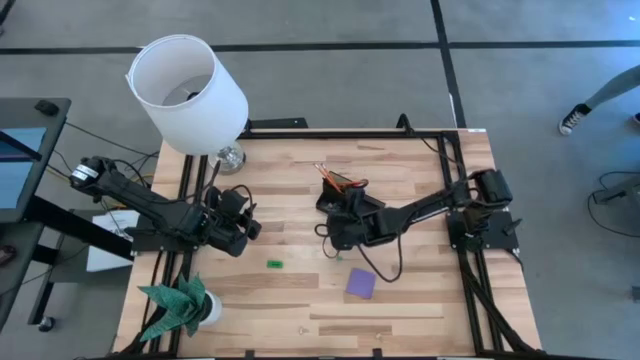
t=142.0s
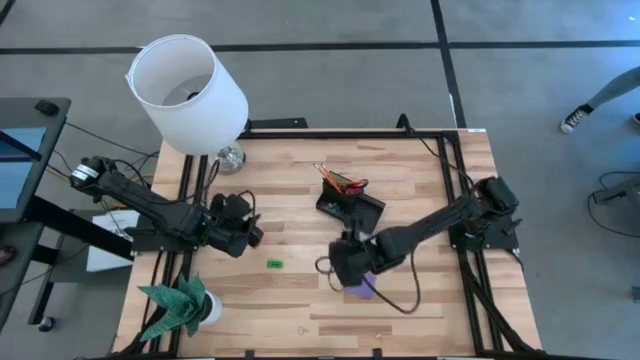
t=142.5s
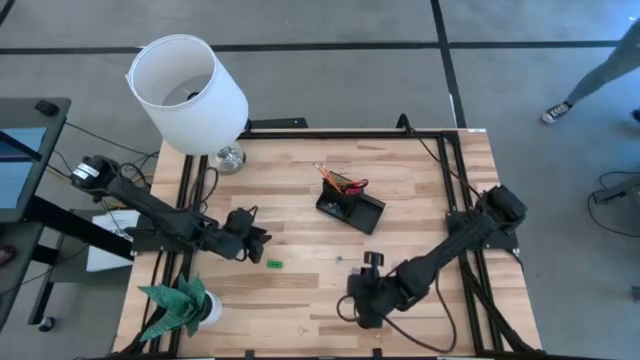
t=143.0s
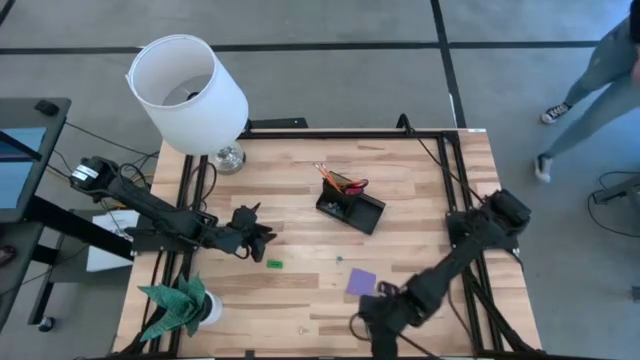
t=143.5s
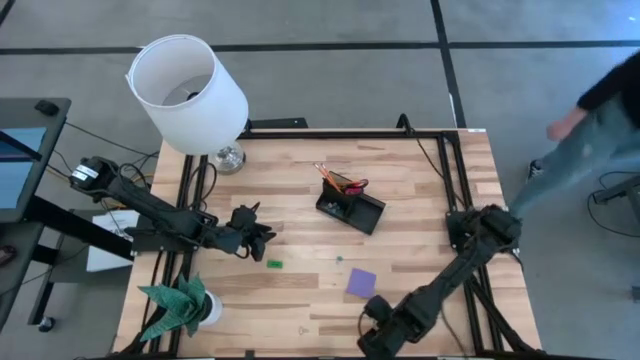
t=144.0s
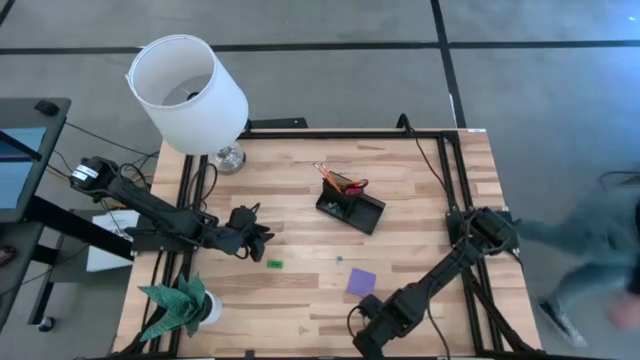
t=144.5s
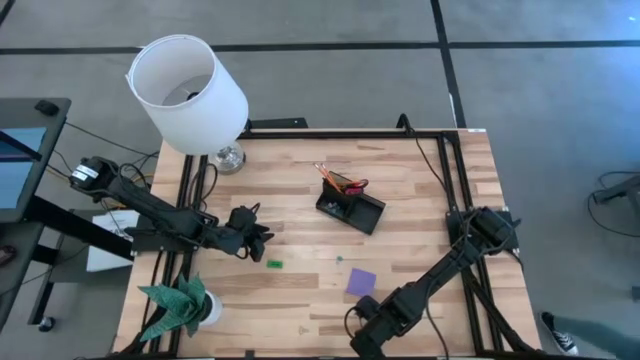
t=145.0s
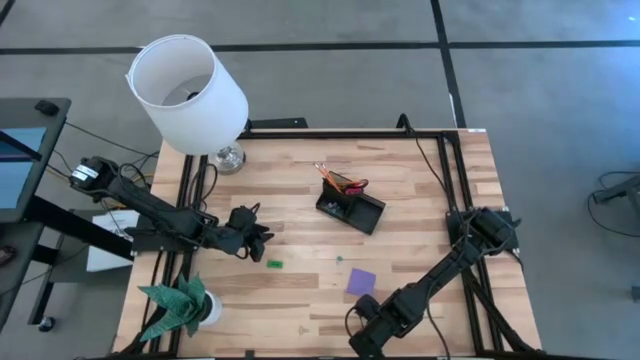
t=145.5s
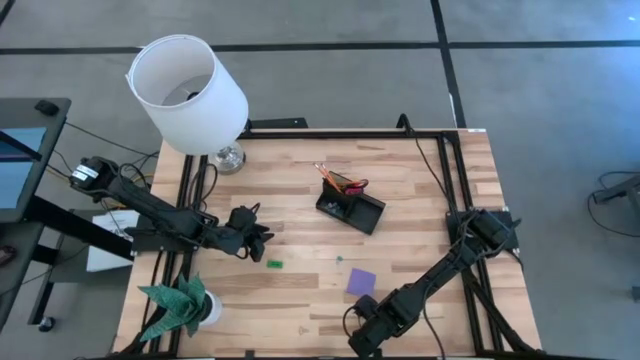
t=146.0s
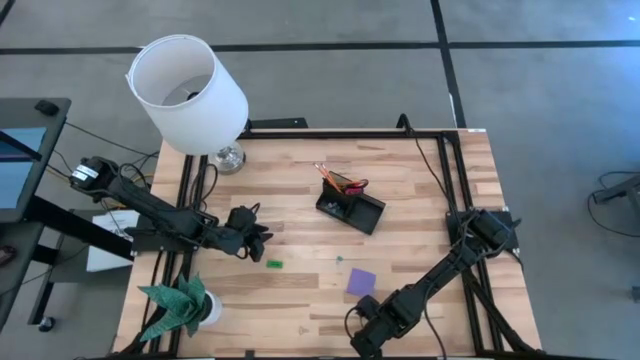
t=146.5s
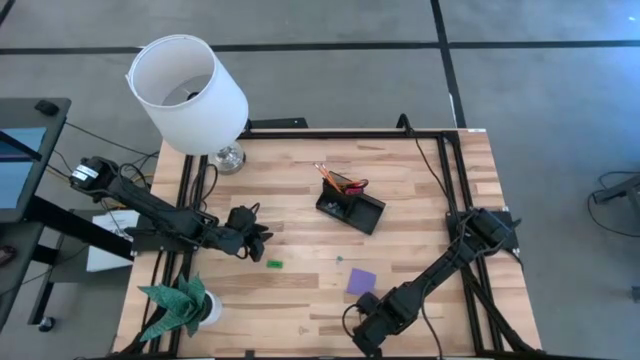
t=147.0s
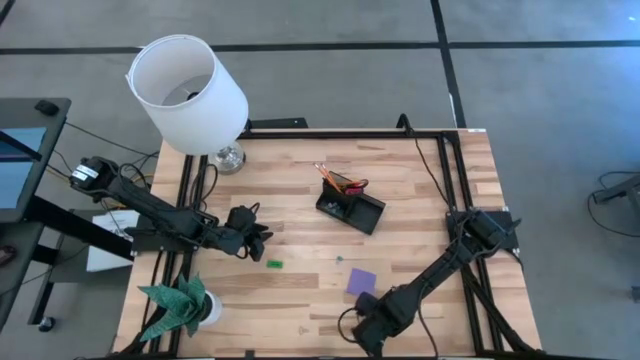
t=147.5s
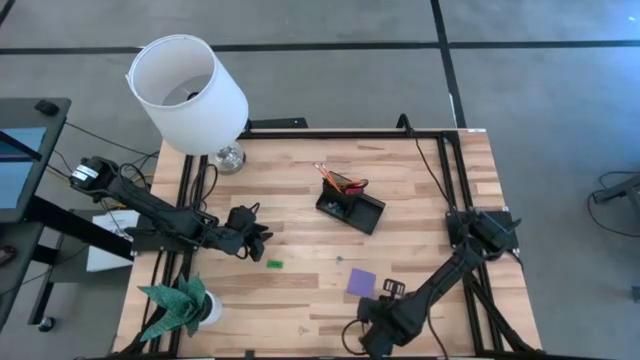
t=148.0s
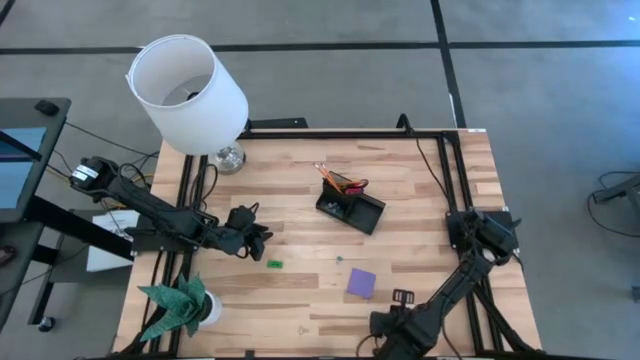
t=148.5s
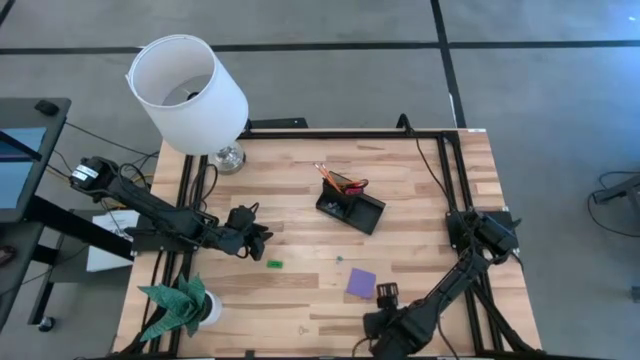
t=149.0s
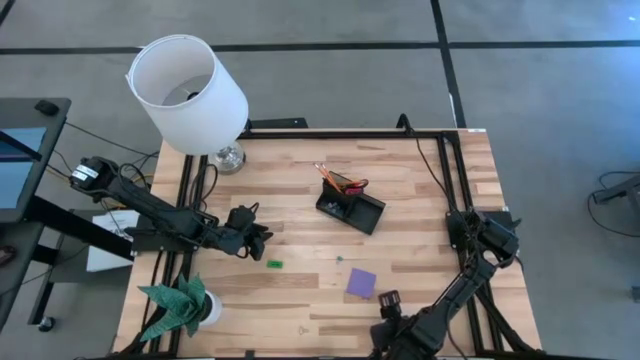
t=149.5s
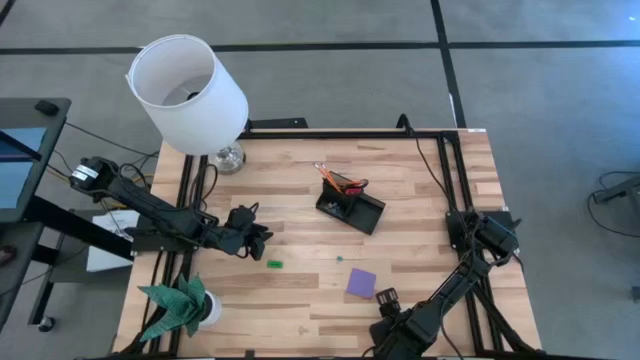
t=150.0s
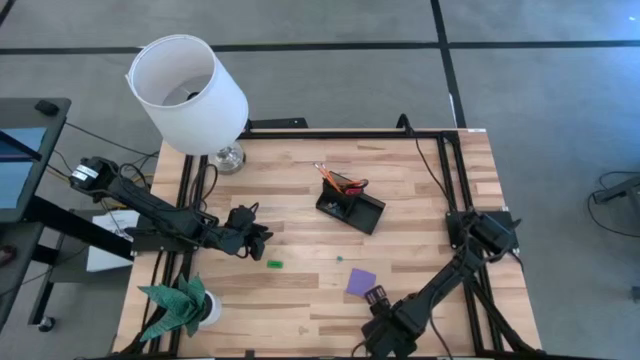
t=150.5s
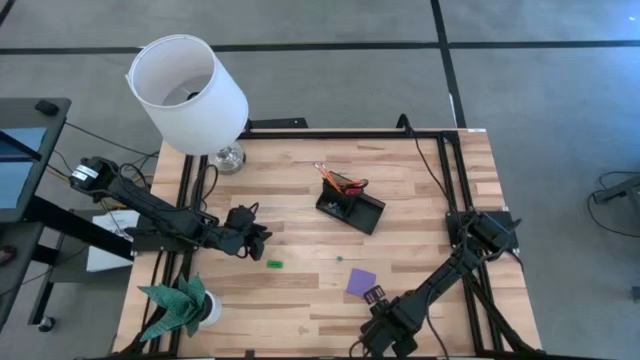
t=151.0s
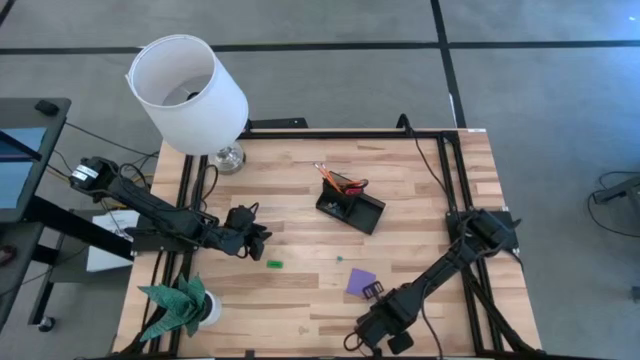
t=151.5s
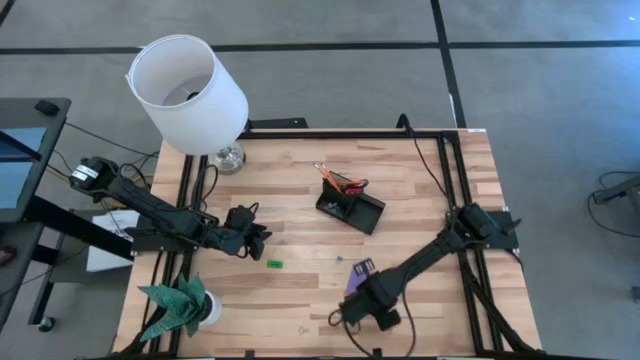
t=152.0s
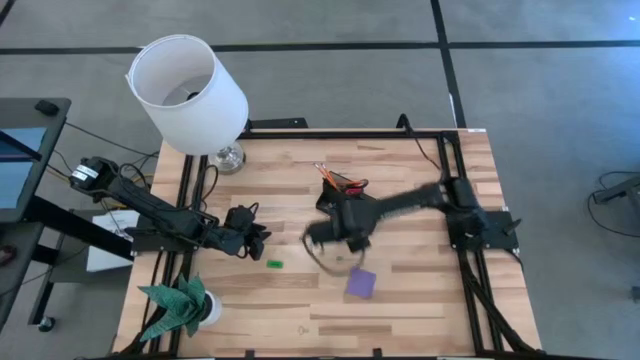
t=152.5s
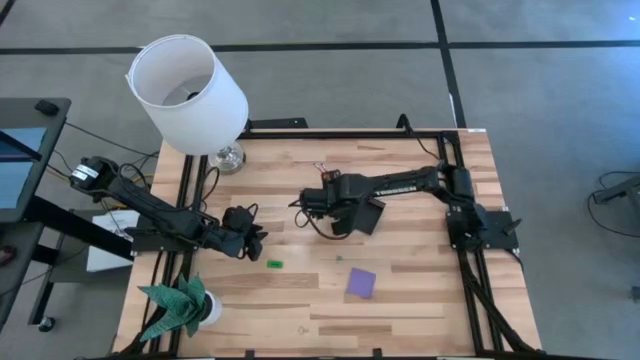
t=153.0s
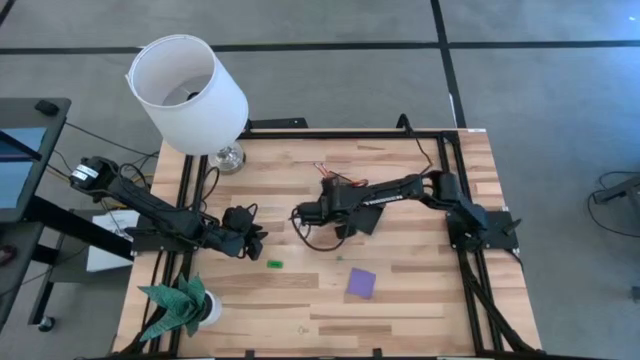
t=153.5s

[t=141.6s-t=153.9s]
Task: Pick and place office supplies into organizer
Put the right yellow binder clip into the black desk organizer

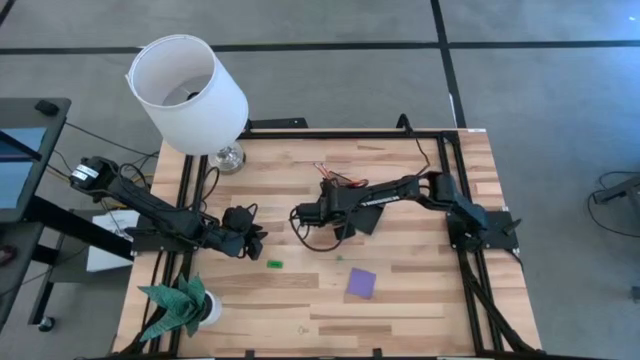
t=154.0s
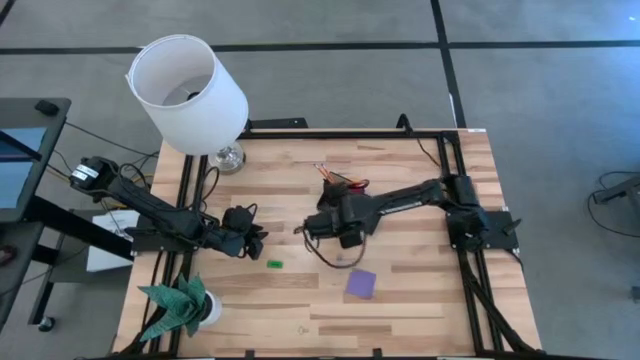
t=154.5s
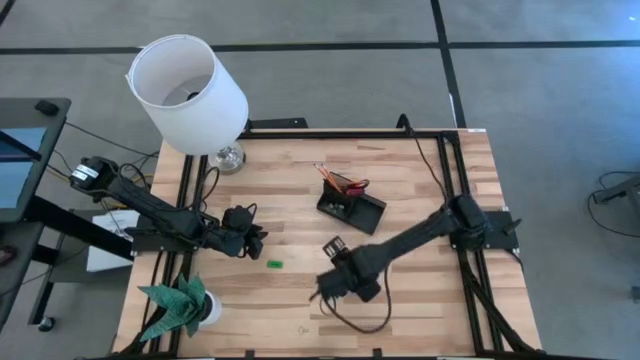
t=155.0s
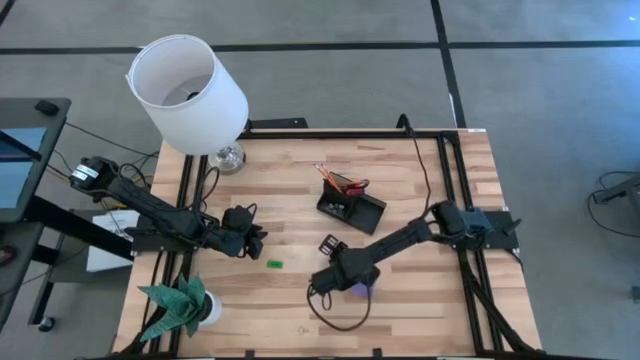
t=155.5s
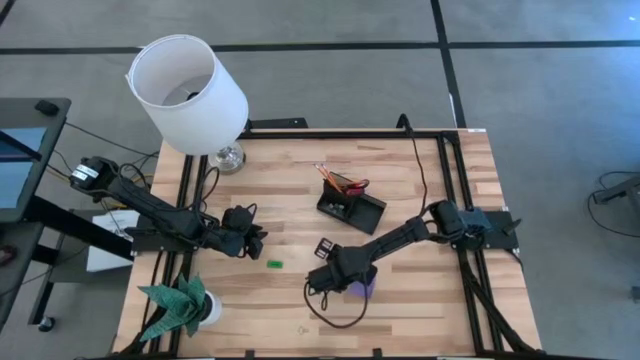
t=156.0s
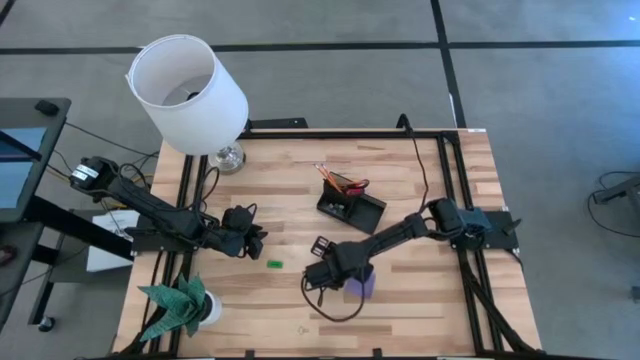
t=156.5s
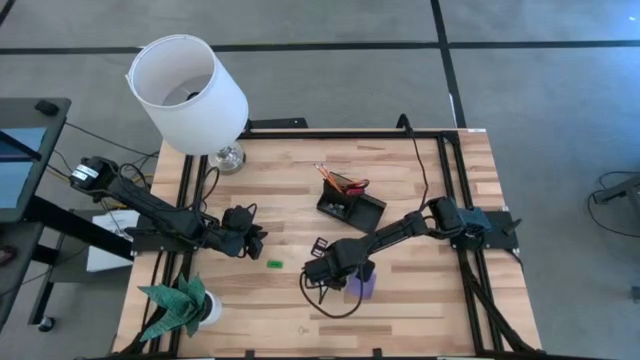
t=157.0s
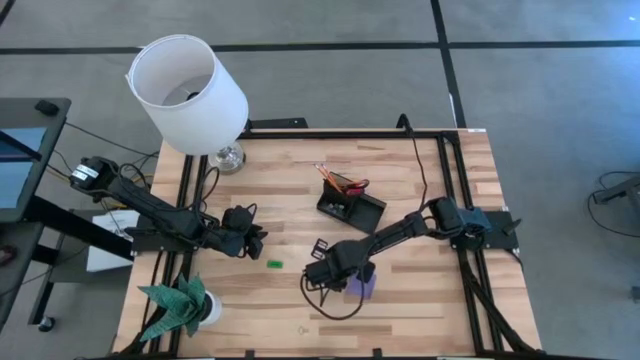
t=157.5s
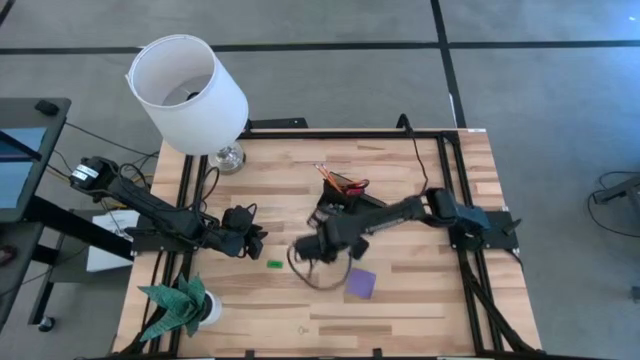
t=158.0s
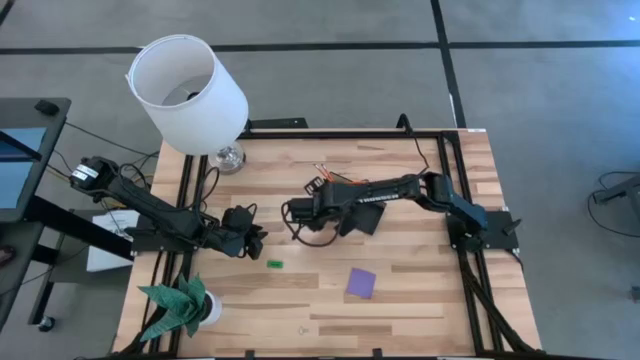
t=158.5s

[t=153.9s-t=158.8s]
Put the green binder clip into the black desk organizer

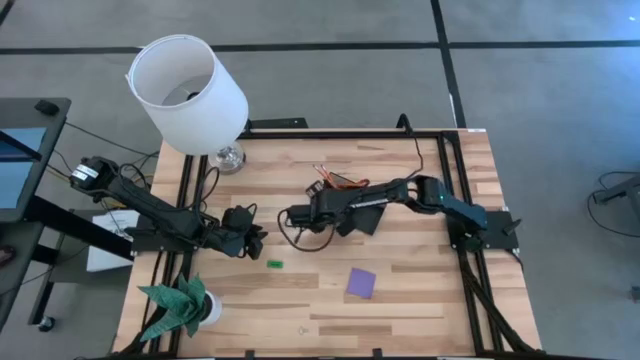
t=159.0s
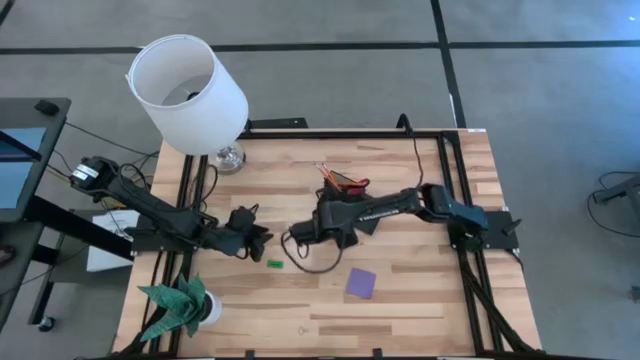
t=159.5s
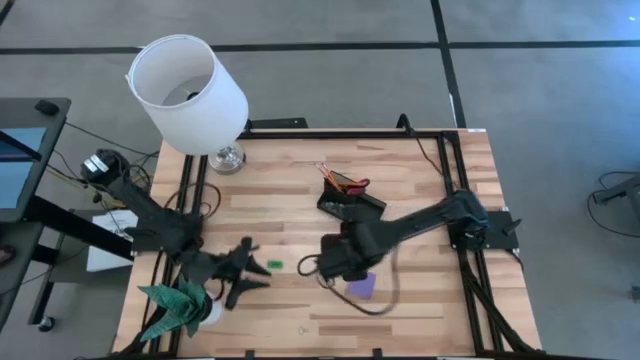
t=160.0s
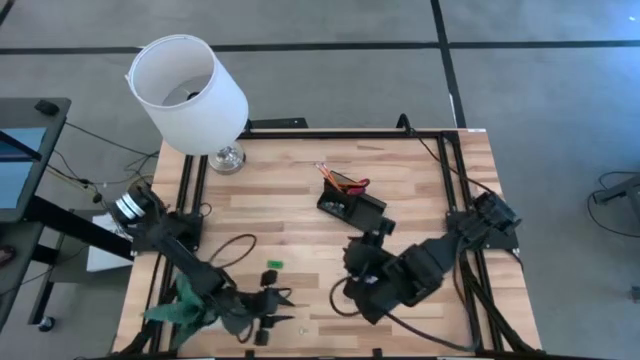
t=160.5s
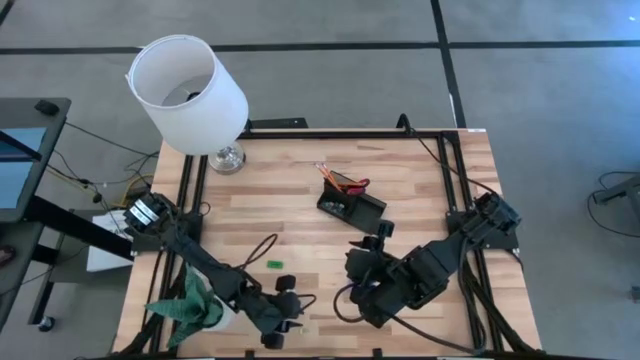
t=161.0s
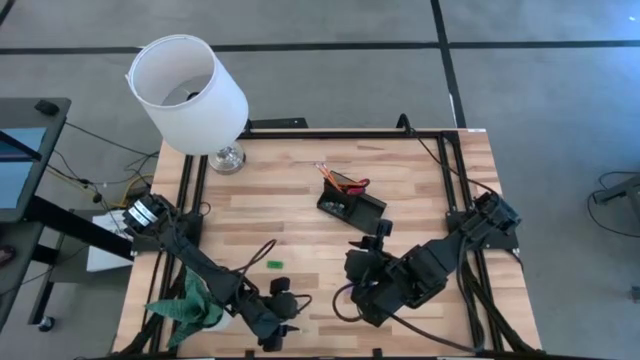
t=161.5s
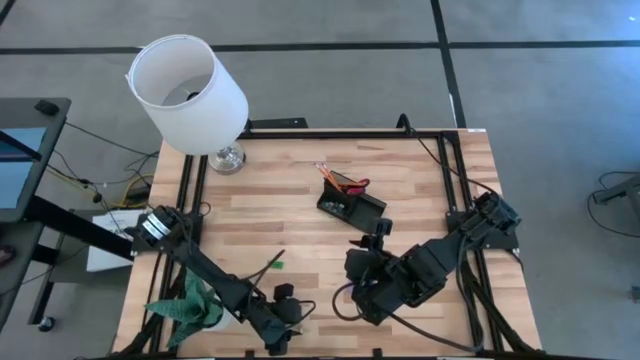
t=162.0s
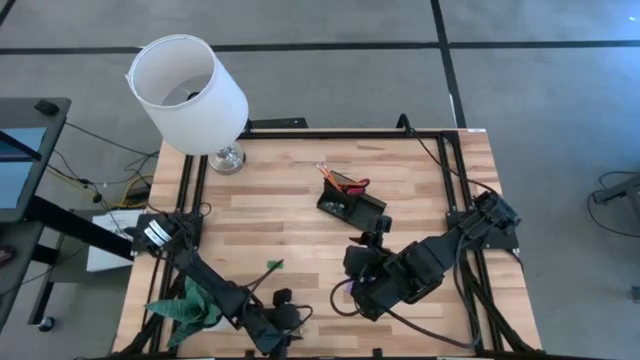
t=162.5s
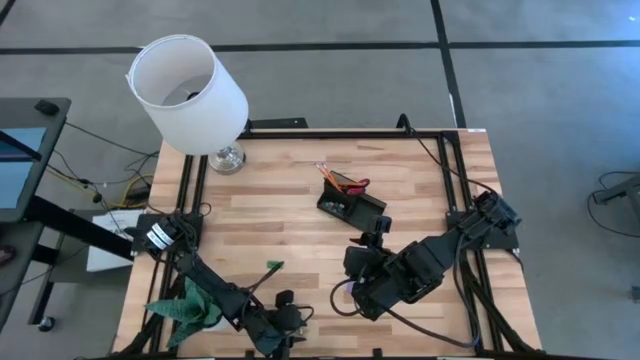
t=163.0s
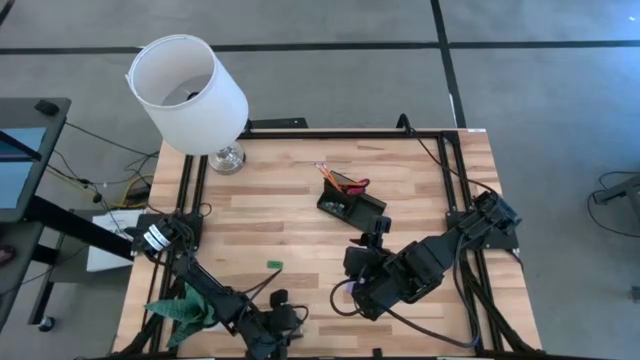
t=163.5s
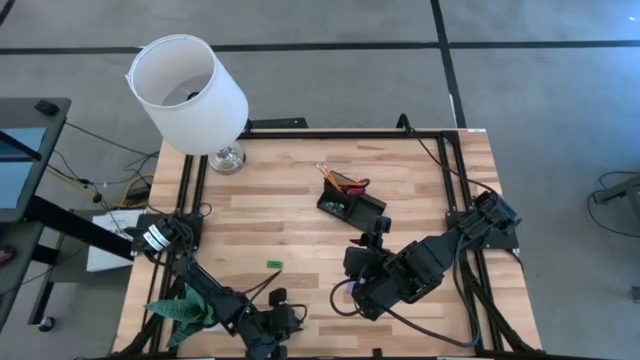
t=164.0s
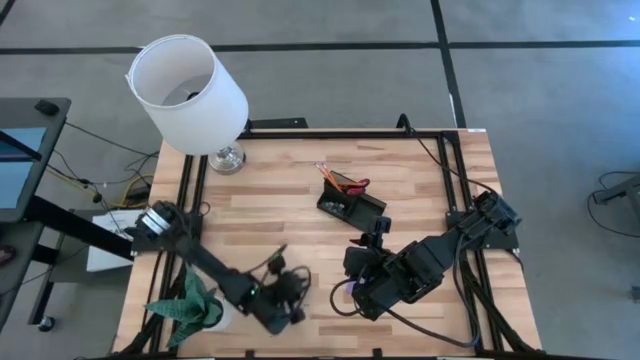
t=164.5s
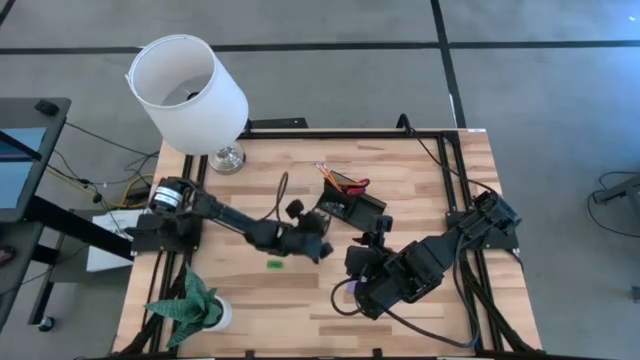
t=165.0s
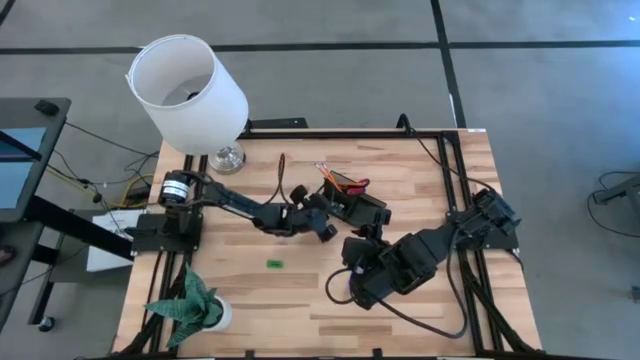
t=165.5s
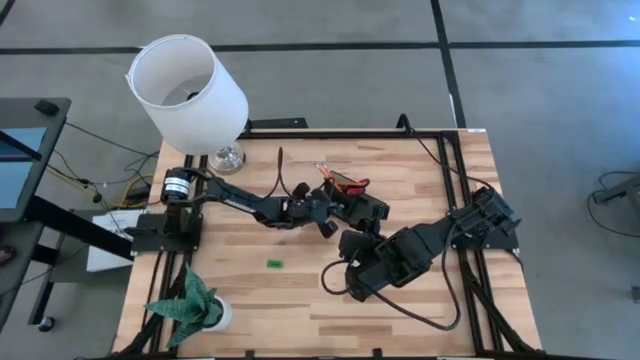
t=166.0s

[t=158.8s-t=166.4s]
Put the yellow binder clip into the black desk organizer
